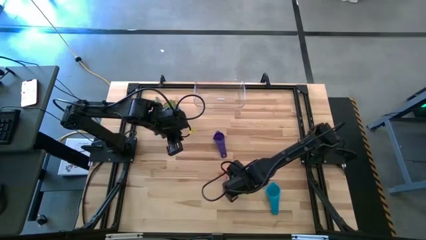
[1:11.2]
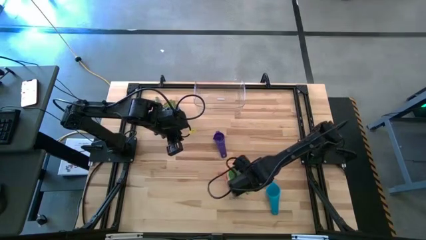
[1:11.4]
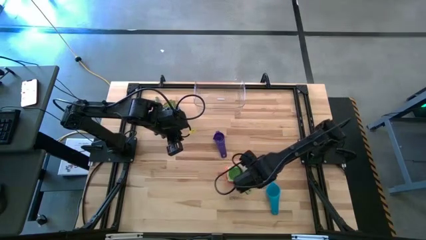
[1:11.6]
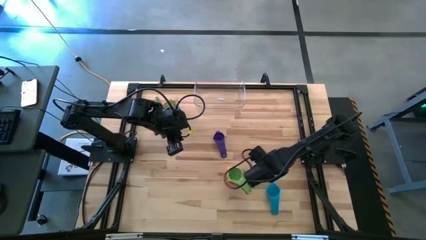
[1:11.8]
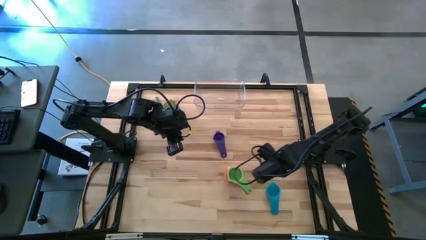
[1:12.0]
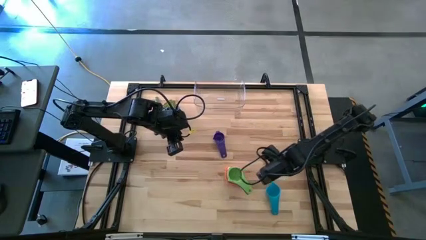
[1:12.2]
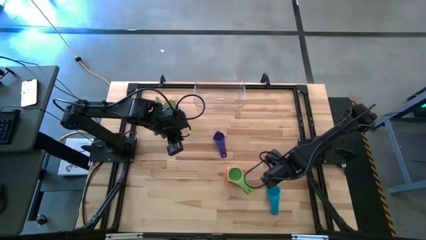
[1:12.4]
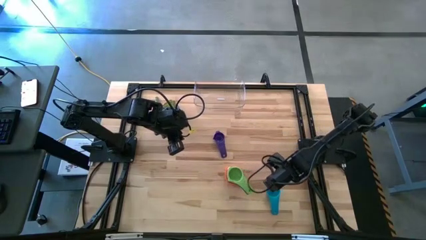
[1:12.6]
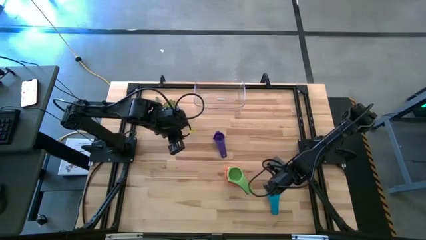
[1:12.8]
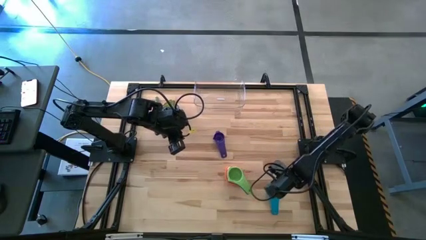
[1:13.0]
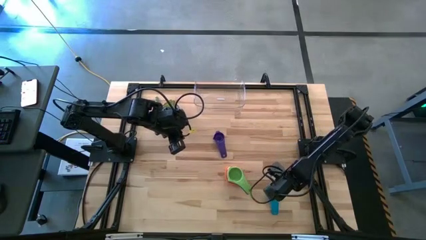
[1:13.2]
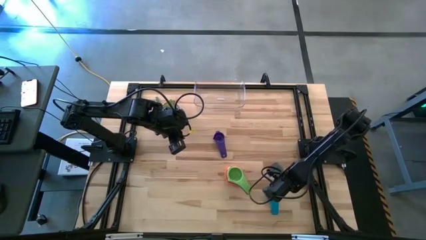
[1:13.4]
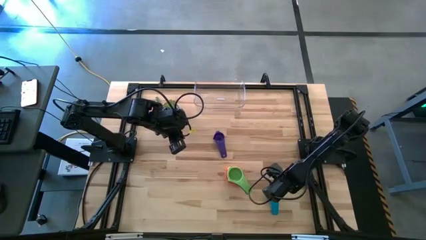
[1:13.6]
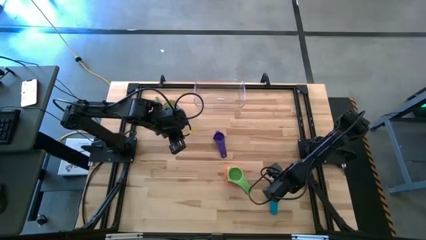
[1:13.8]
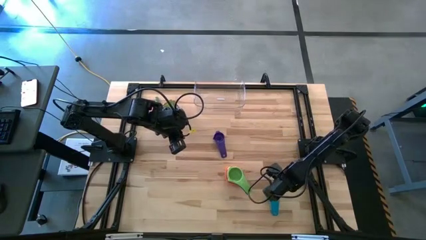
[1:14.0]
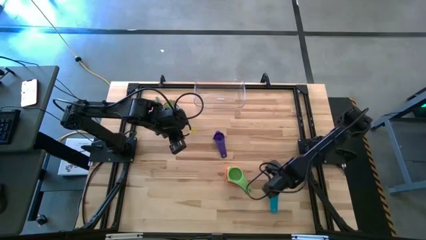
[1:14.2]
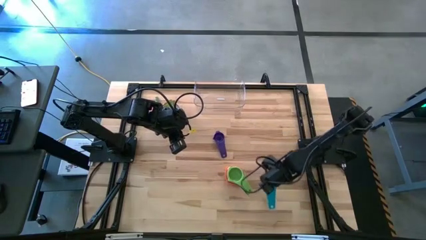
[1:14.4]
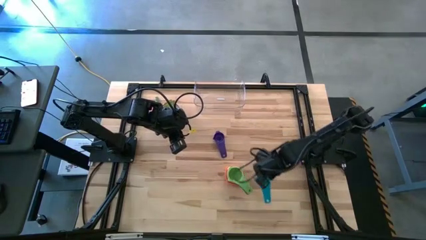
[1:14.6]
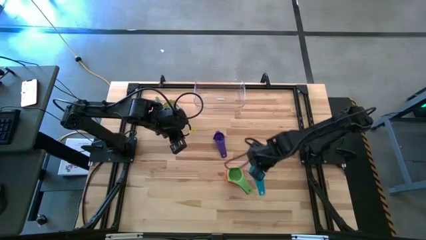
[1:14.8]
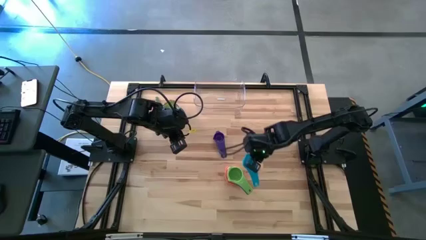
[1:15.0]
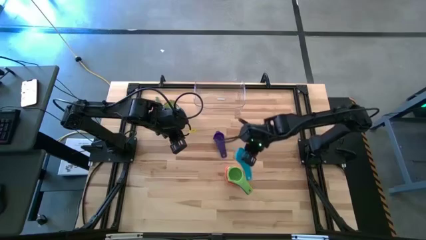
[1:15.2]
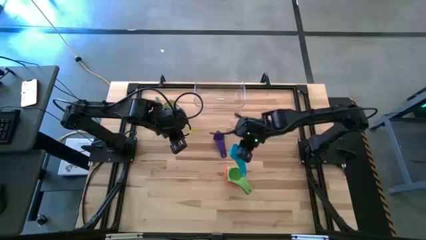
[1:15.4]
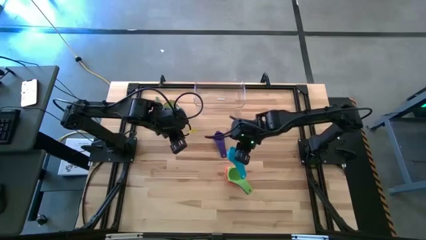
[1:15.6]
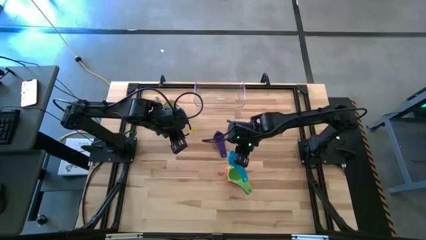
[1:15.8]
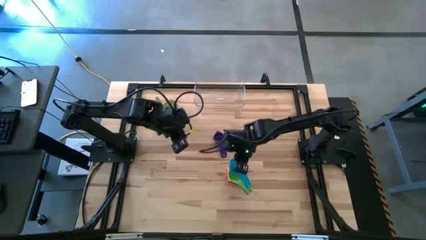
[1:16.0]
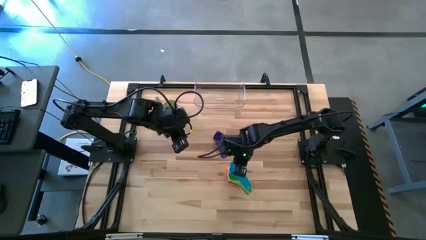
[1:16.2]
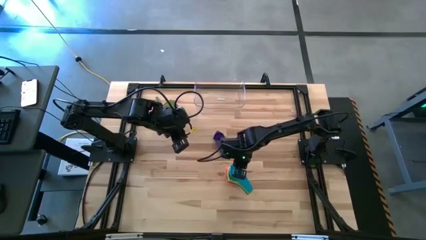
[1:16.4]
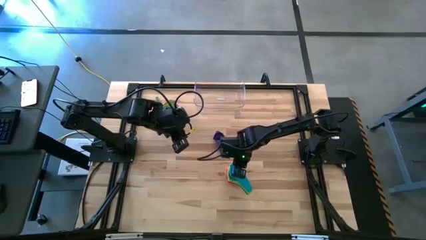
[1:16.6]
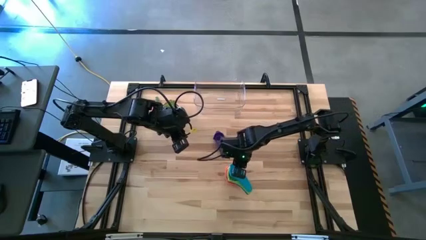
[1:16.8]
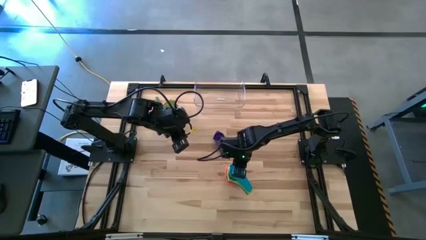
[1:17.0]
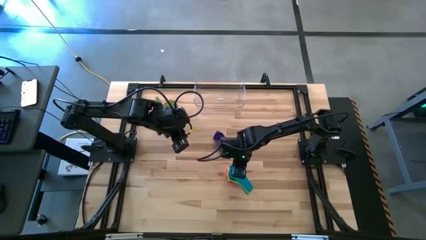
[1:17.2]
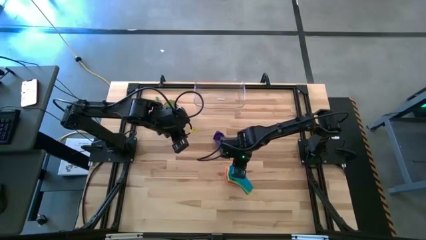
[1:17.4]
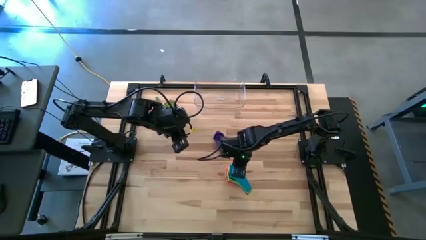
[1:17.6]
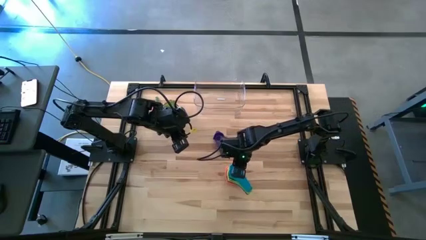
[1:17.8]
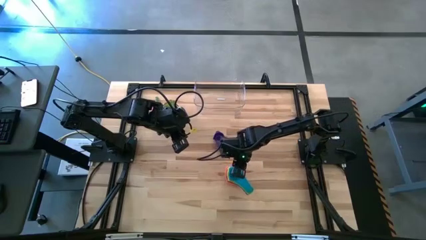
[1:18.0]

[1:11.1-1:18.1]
Task: Nest measuring cups in basket
Stack the light blue measuring cup on top of the green measuring cup

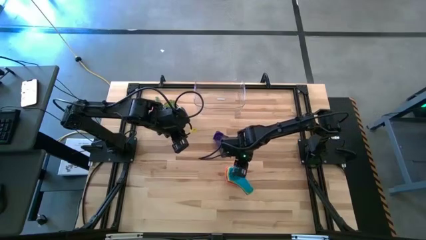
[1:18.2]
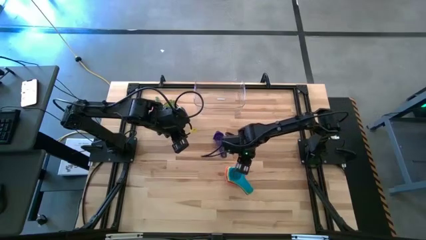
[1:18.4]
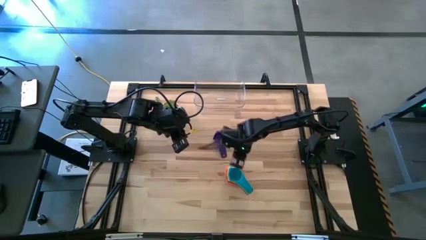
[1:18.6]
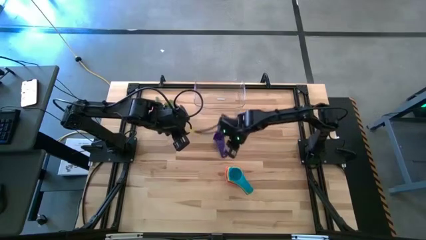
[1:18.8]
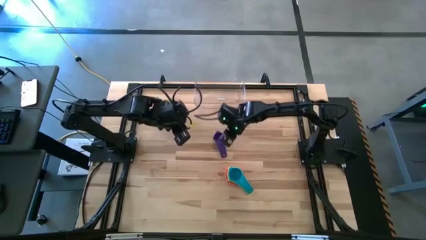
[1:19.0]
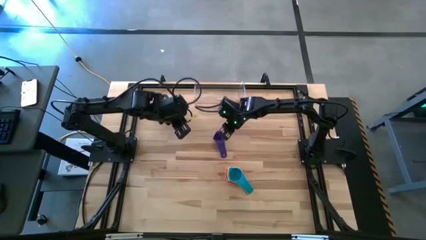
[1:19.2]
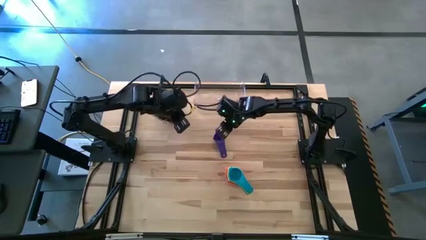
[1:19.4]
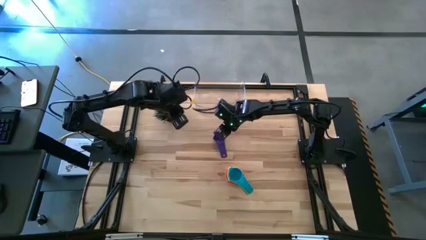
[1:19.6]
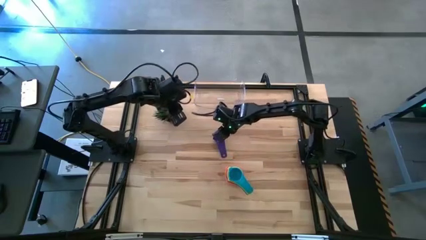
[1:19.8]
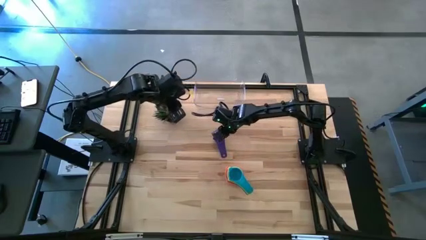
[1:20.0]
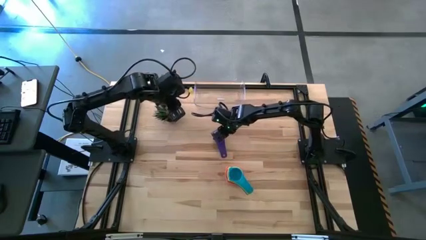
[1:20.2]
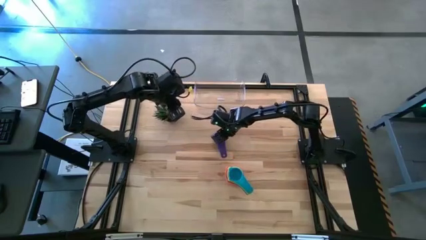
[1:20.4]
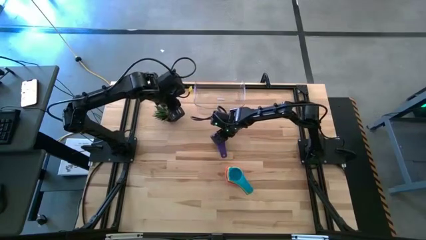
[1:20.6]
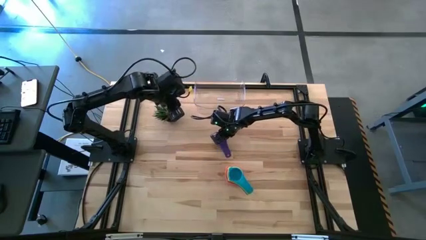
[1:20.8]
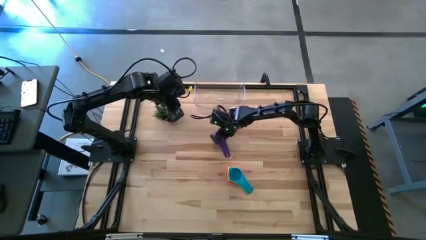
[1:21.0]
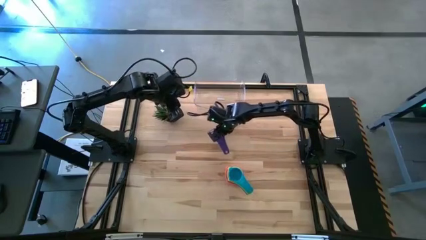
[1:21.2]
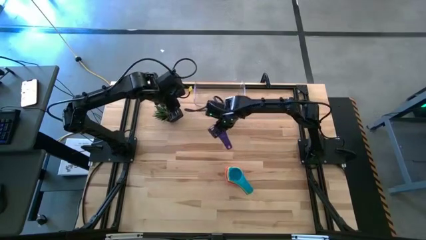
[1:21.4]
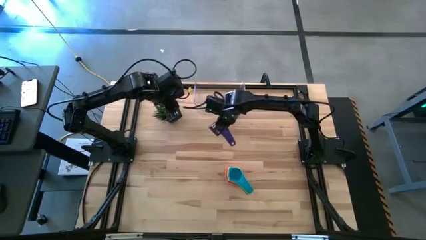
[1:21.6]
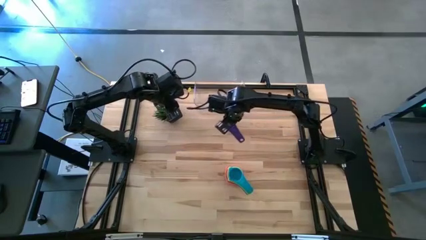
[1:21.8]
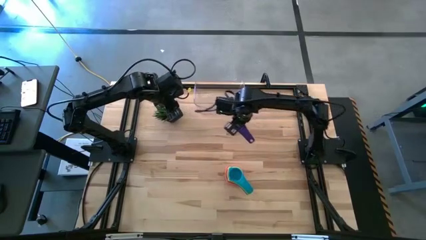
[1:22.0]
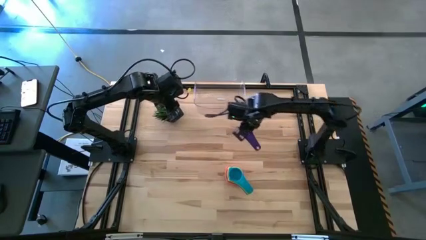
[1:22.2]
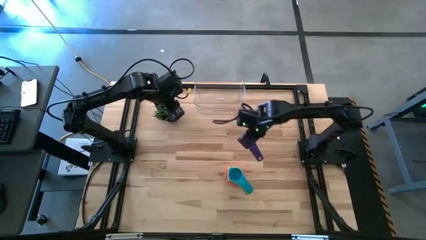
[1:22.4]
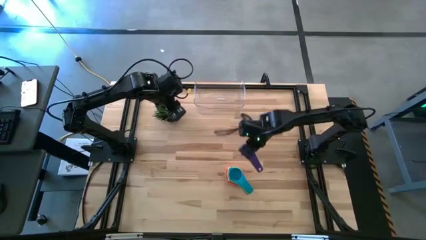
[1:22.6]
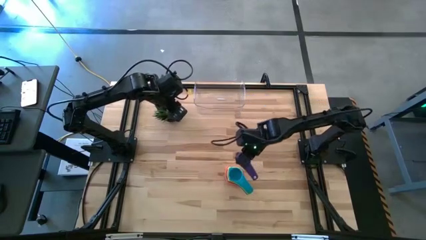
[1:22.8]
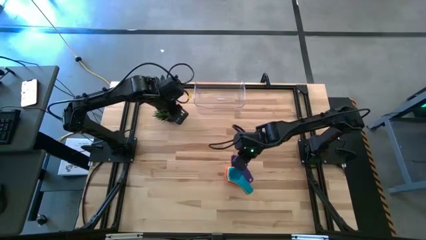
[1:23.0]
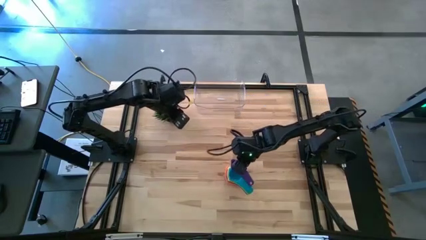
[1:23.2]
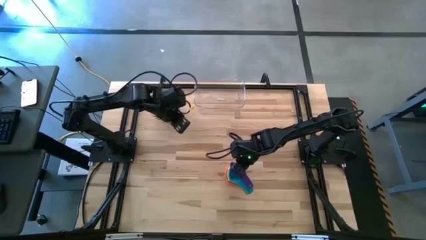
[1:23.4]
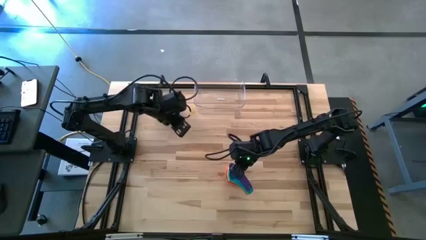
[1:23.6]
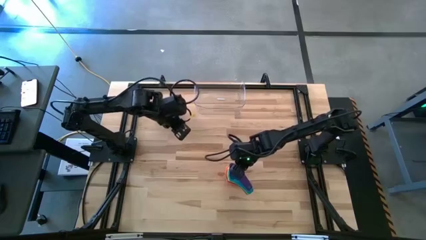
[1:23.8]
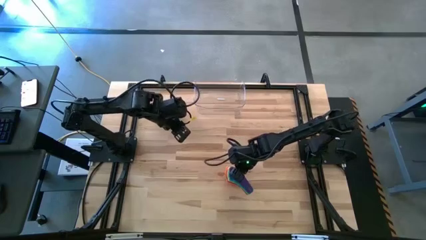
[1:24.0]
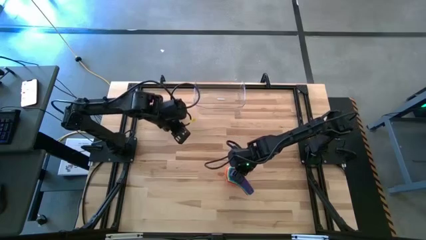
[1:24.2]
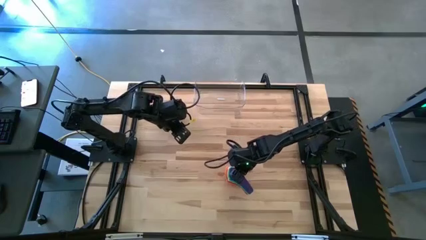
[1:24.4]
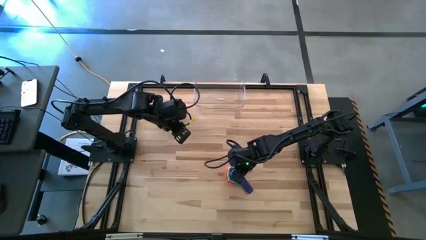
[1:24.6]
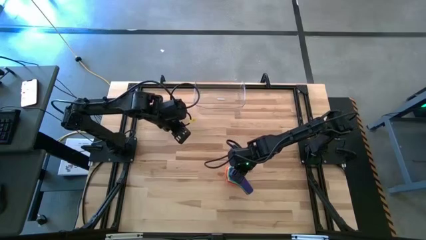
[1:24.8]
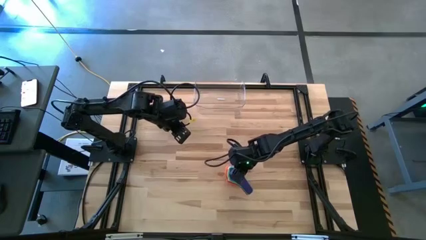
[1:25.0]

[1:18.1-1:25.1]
Stack the violet measuring cup on top of the light blue measuring cup

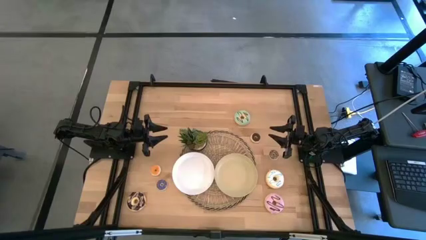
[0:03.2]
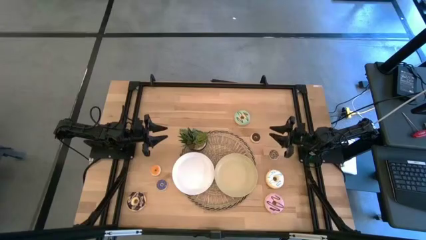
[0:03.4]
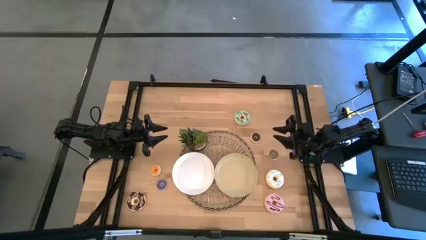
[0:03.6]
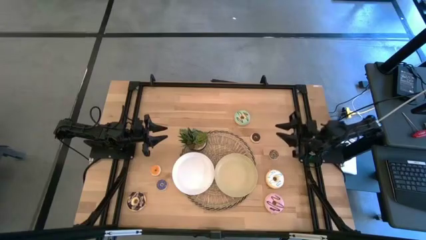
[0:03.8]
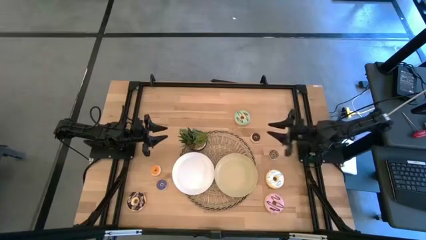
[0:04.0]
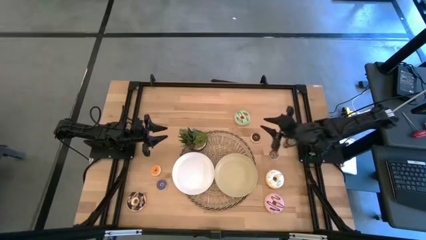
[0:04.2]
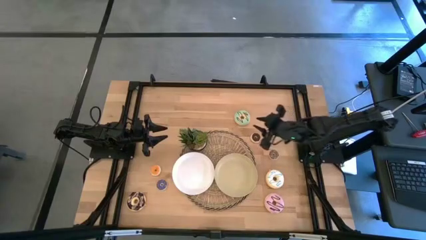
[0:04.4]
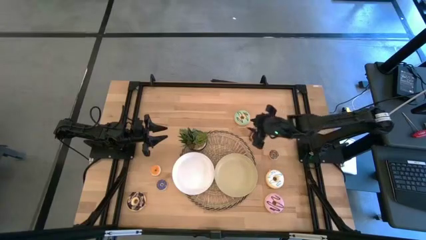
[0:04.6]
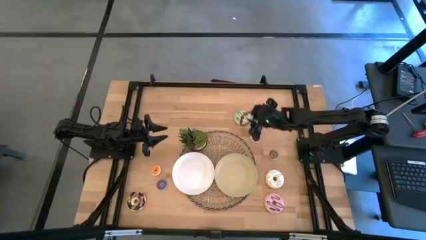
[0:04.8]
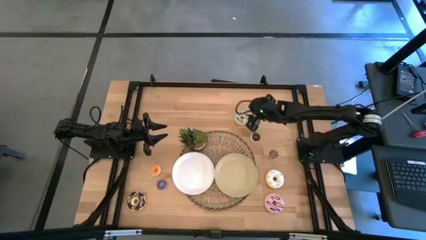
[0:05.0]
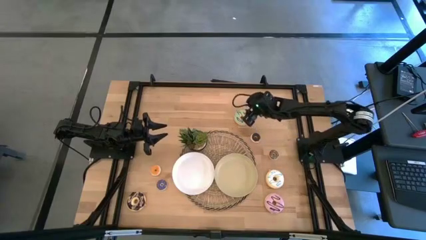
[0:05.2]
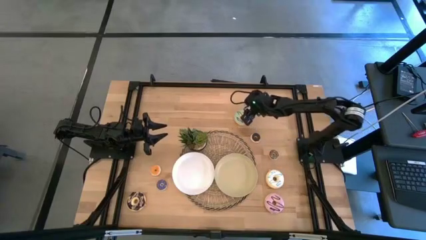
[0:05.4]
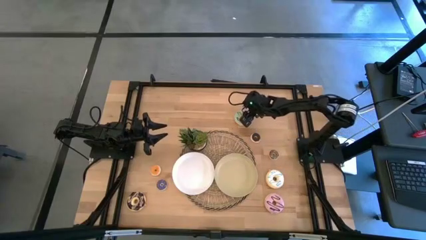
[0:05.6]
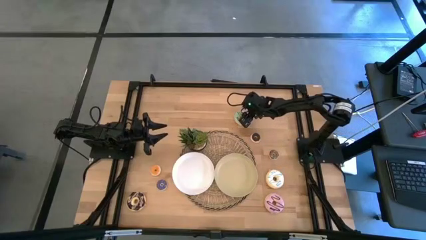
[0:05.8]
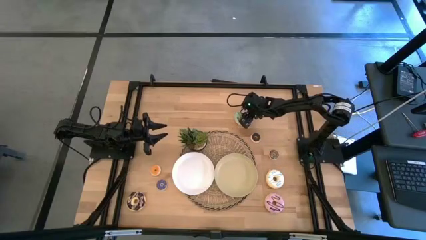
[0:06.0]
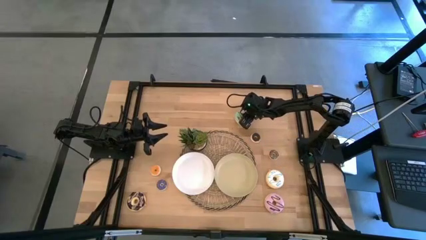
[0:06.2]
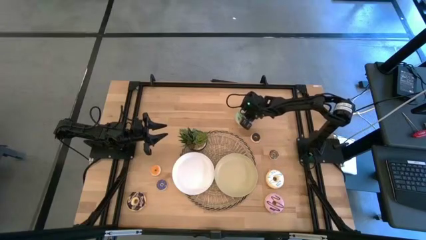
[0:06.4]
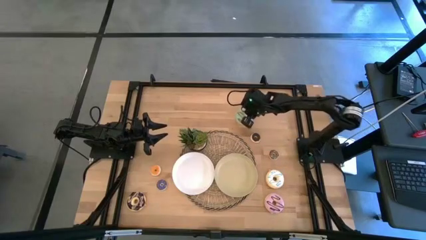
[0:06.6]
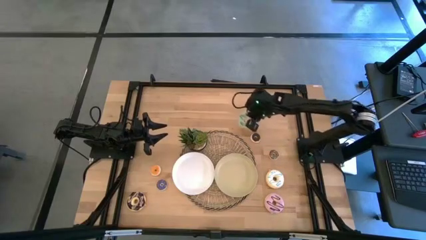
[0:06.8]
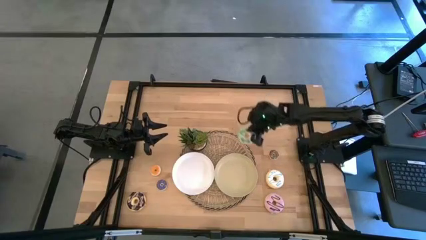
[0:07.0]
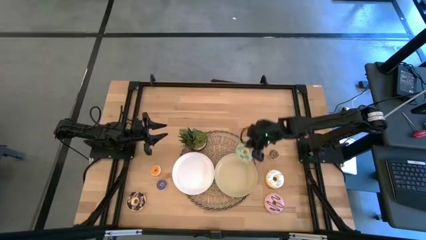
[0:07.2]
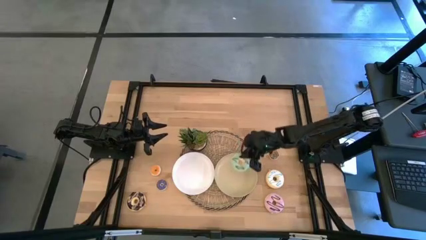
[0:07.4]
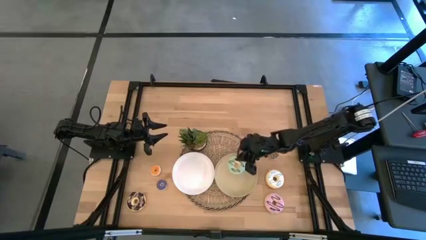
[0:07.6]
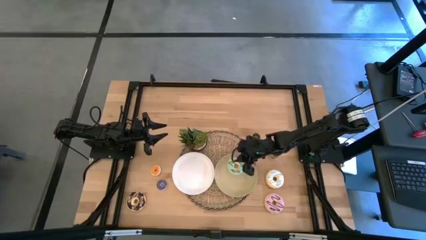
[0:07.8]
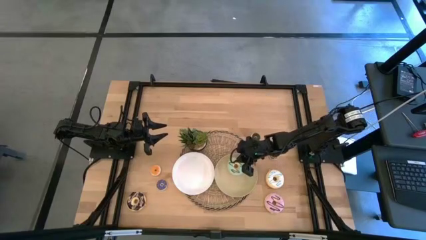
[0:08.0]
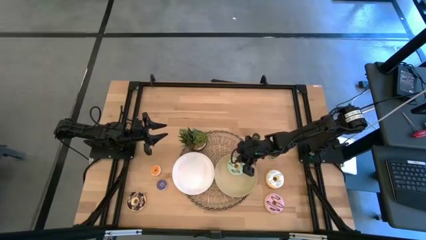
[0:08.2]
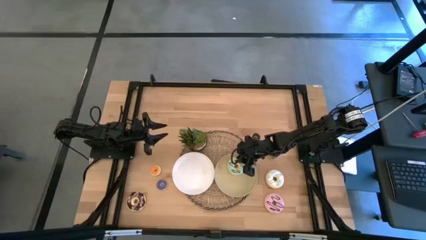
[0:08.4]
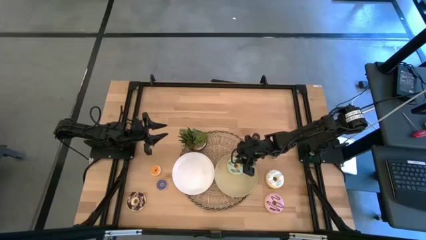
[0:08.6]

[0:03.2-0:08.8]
Task: Pick & Place donuts
Put the big blue donut on the brown plate
